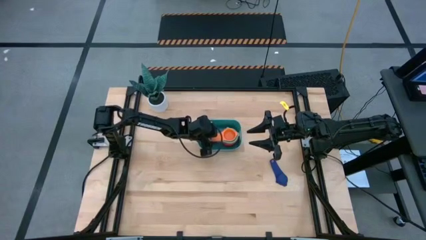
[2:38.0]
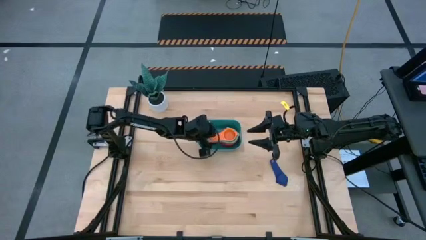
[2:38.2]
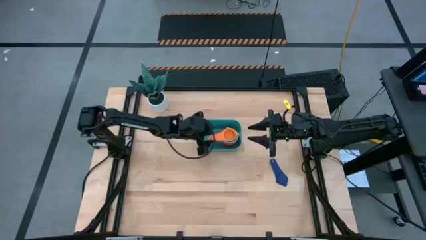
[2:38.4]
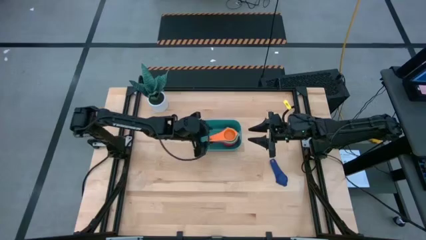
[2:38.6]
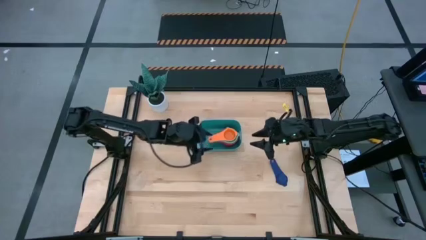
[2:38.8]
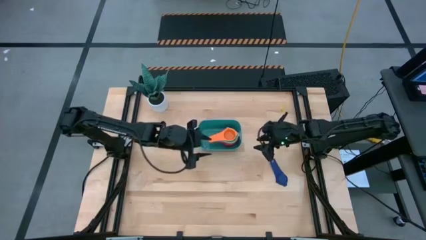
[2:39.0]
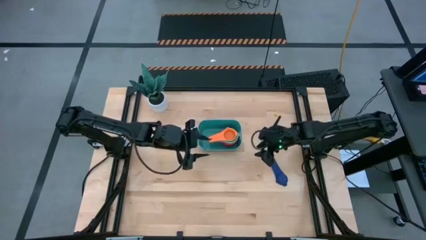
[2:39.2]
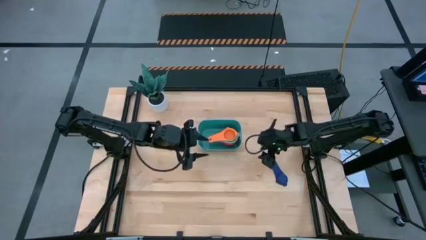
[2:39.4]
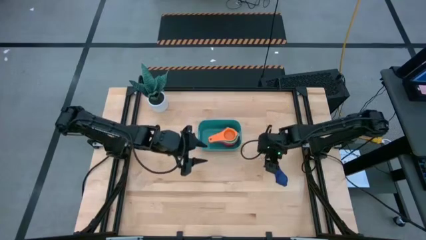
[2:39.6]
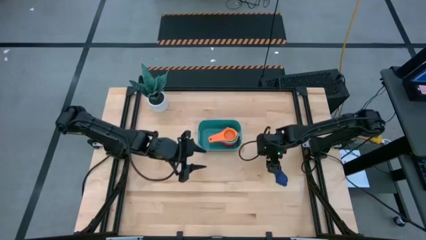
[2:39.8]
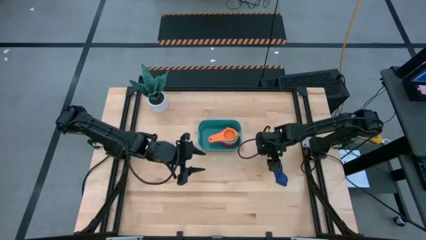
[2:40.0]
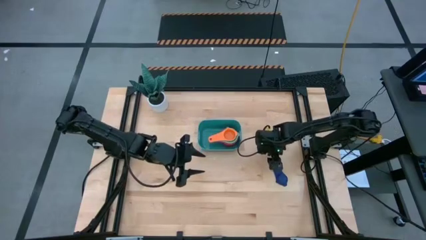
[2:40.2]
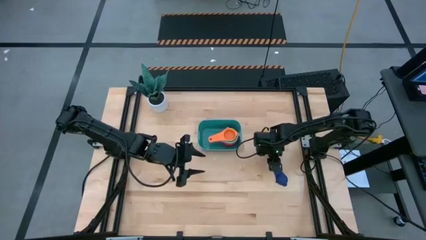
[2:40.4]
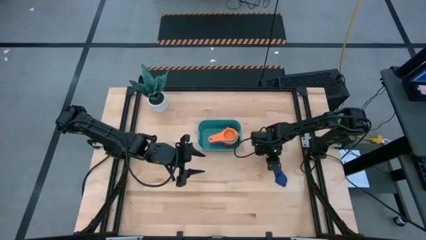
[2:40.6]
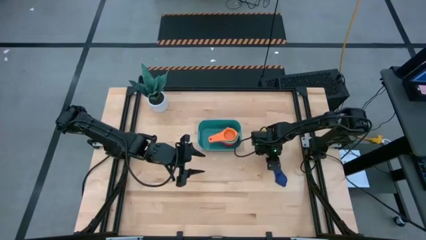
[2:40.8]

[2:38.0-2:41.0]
Task: Nest measuring cups in basket
Stack the dark blue measuring cup on top of the orange measuring cup inside the light blue bin

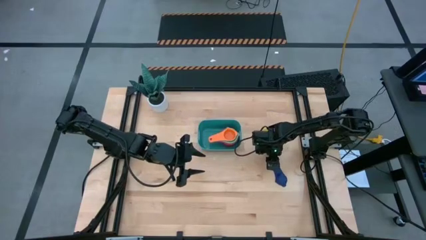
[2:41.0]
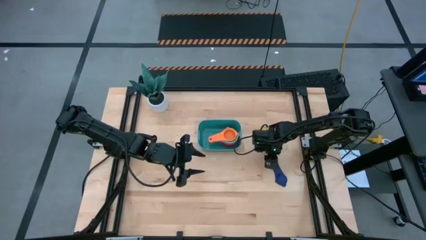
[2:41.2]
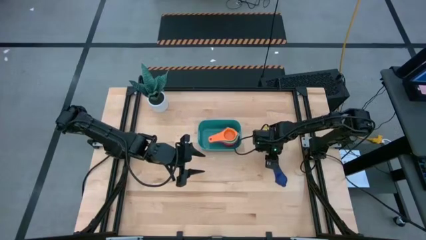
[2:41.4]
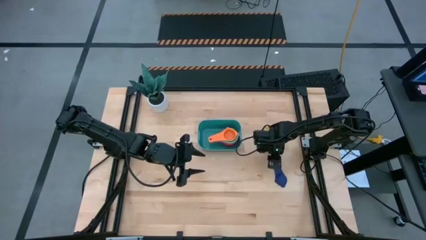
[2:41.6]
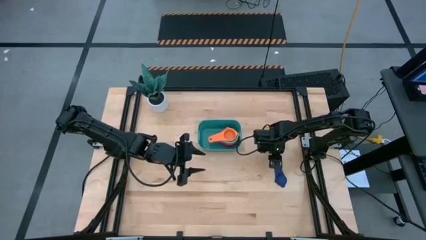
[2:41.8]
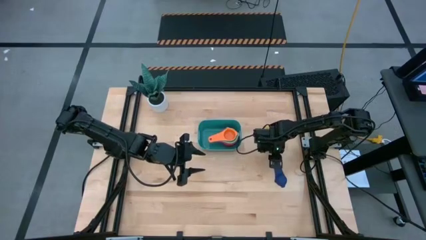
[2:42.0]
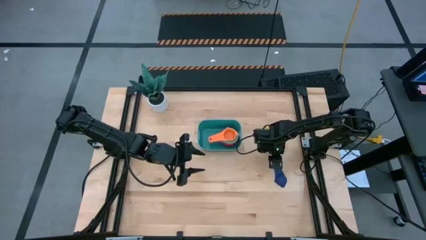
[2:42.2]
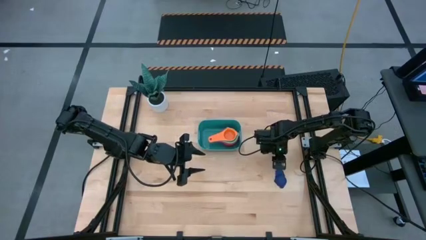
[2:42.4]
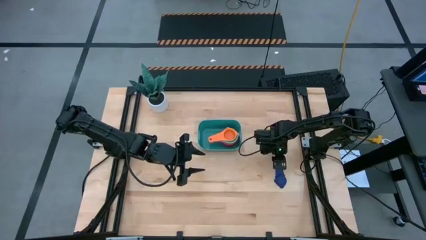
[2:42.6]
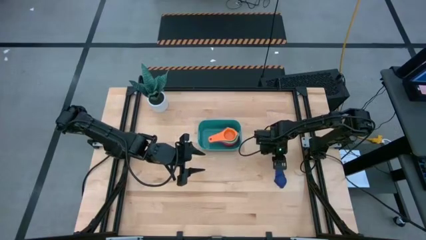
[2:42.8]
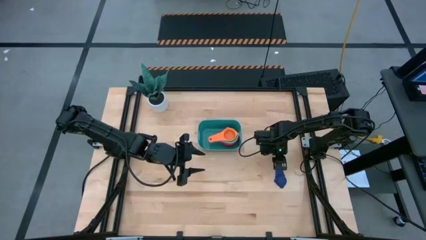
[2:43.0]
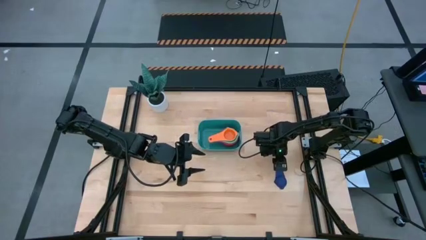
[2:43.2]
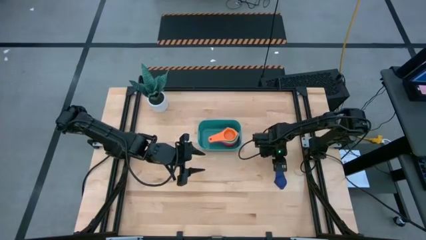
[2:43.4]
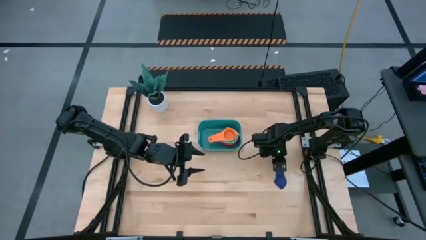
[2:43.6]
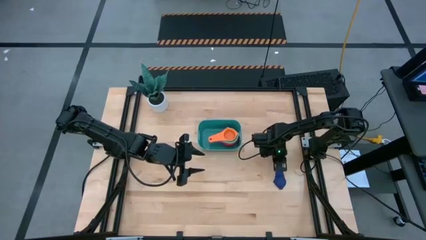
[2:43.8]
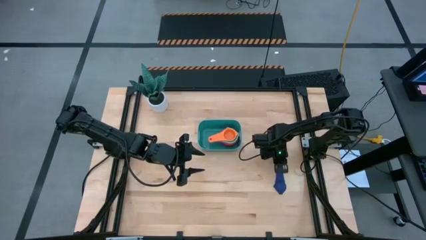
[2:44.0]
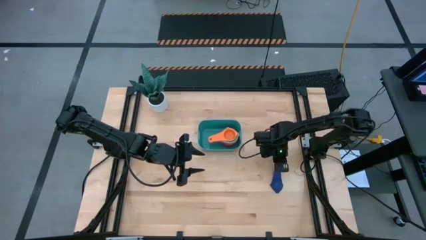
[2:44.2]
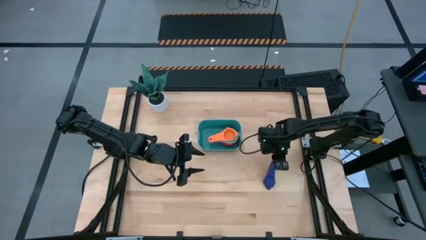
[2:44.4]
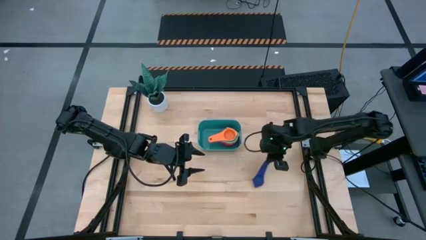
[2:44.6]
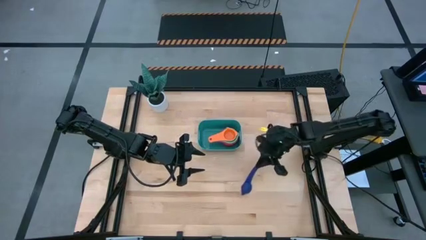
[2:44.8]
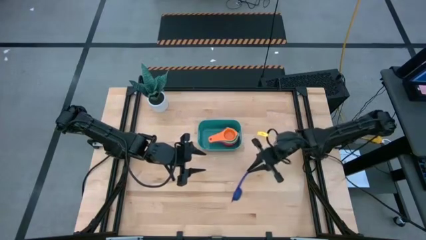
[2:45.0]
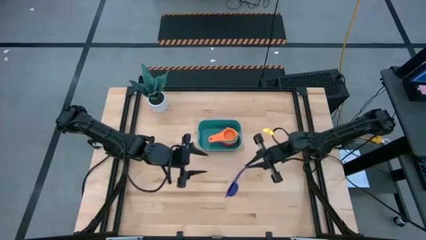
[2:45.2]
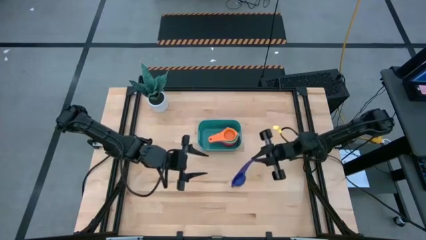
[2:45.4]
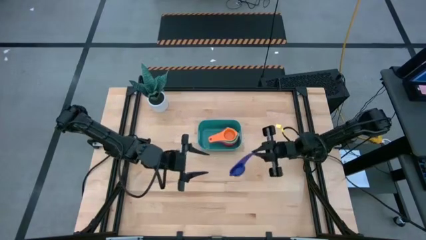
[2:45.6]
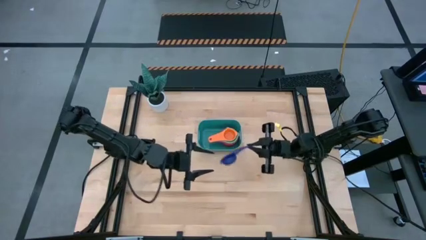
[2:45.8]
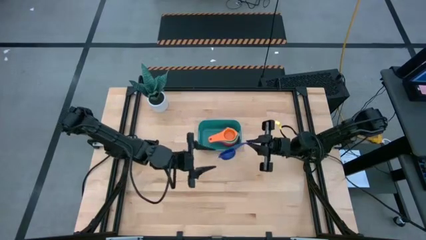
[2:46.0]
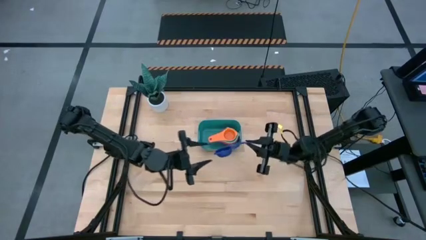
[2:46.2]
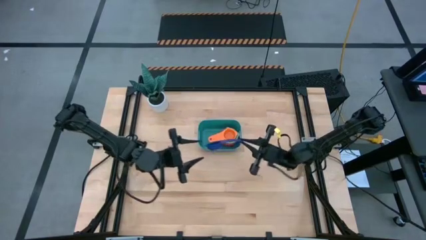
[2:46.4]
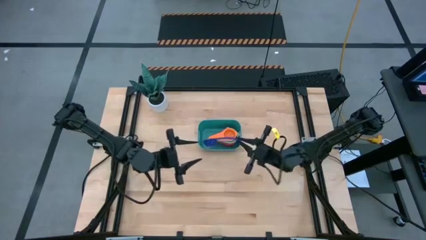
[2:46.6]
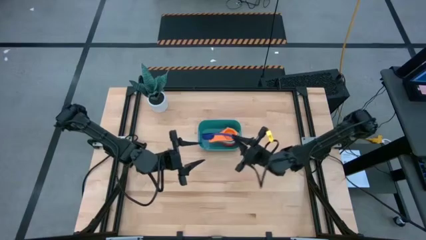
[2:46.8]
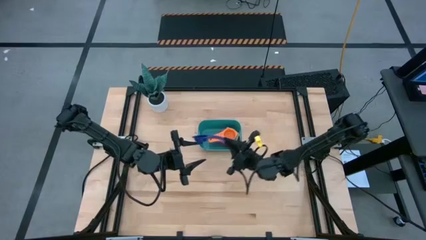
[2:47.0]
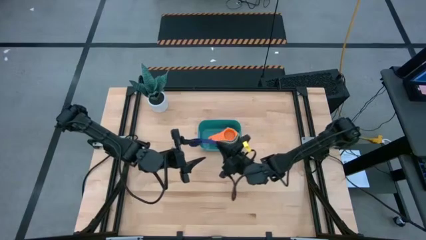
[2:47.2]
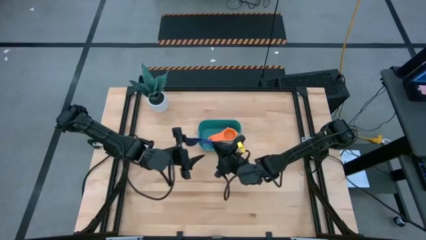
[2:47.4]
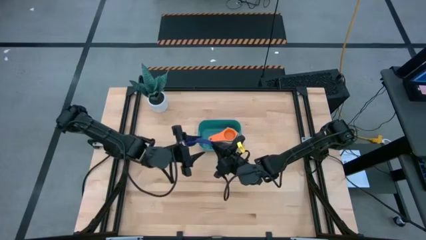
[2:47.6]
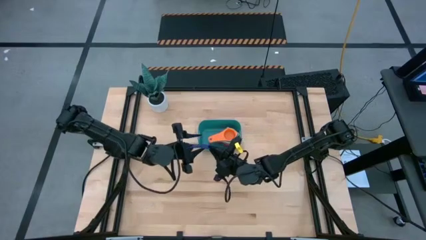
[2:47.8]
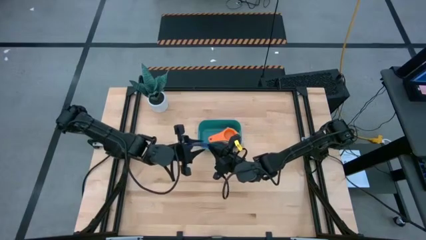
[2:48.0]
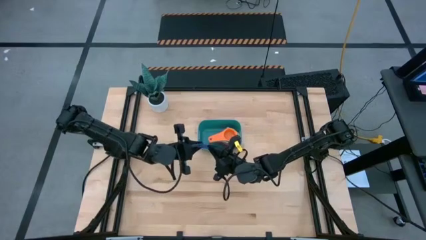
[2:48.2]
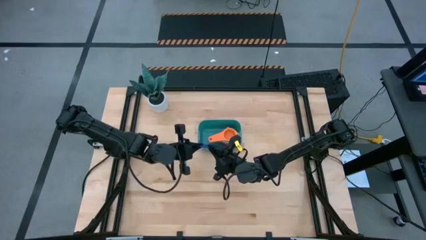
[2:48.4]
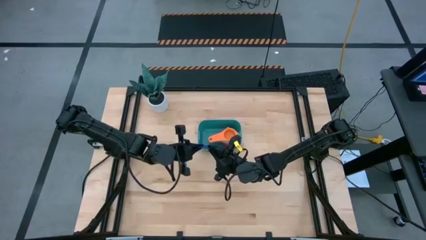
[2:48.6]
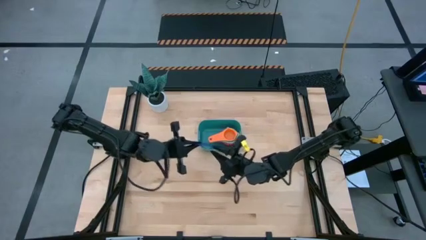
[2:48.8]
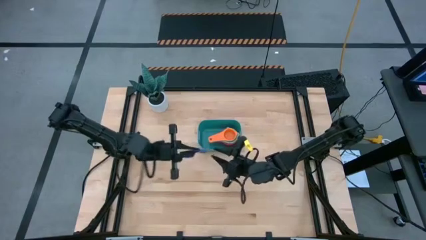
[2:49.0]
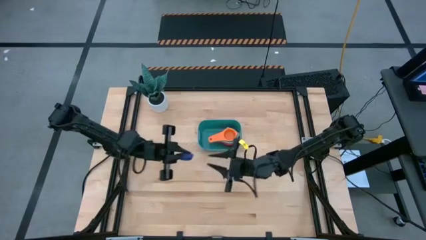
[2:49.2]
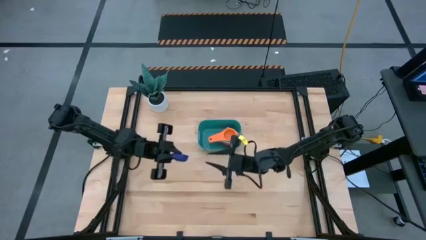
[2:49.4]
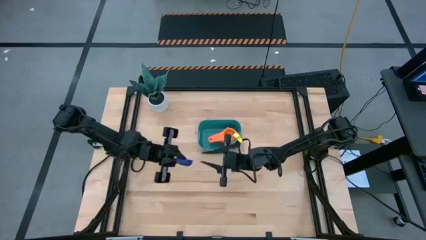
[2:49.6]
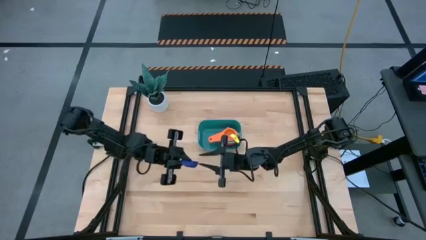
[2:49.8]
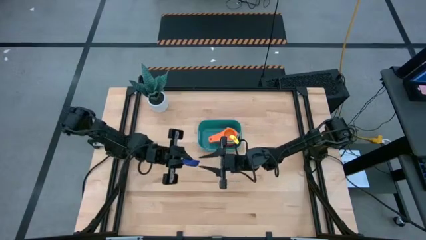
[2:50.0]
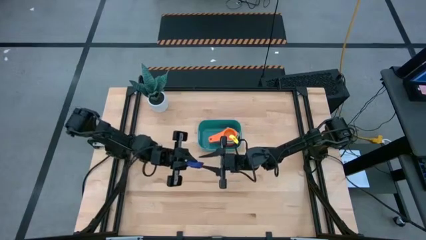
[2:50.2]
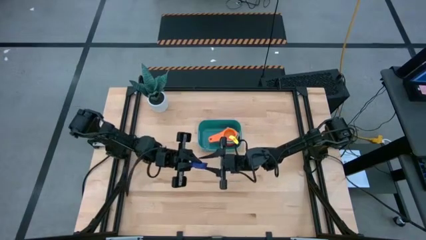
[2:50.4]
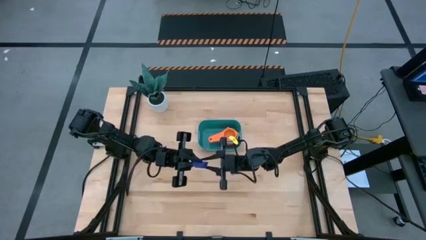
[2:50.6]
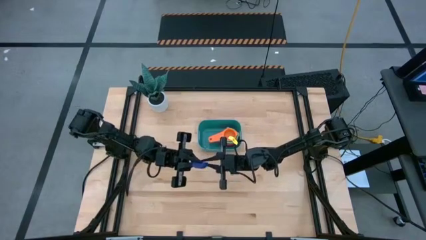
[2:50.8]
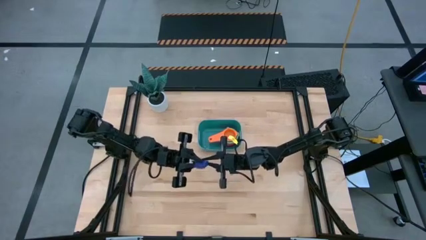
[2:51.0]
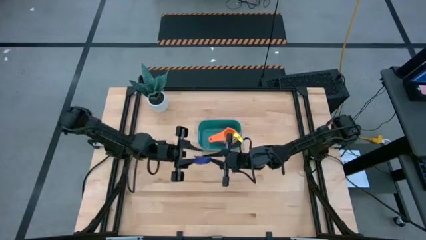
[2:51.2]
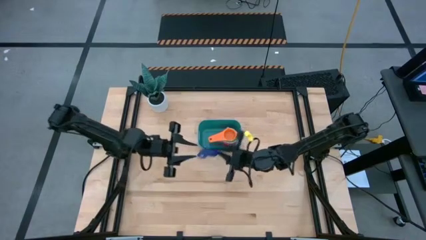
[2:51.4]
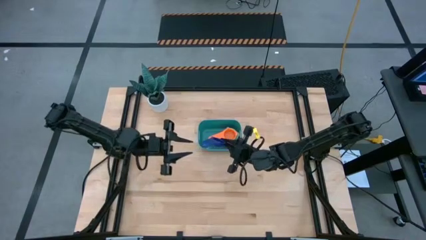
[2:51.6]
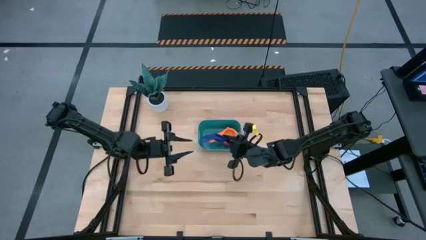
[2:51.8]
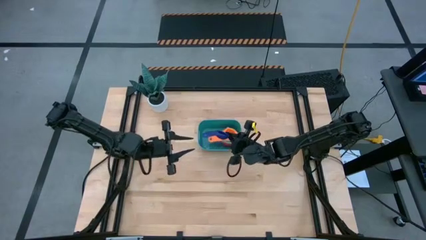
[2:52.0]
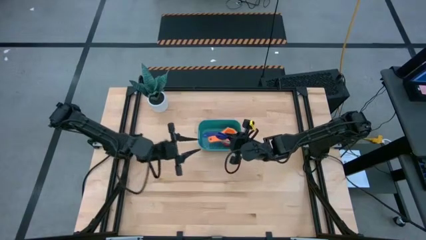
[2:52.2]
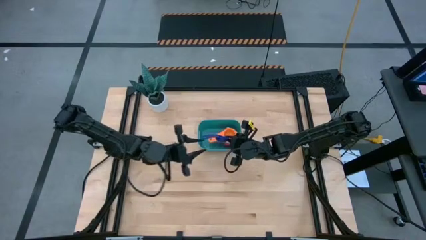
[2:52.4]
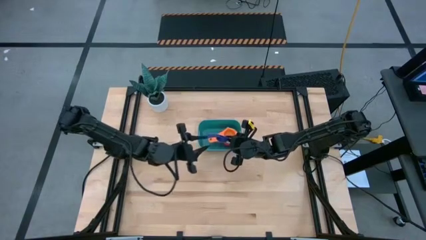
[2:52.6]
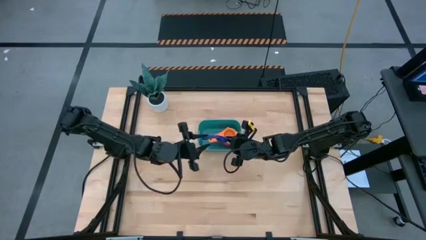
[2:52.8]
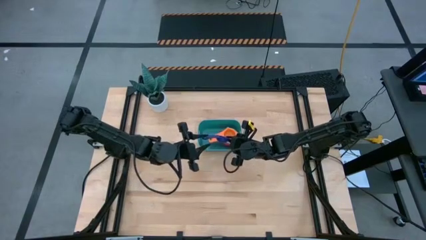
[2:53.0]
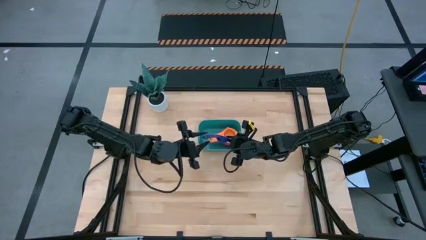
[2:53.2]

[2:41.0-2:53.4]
Stack the dark blue measuring cup on top of the orange measuring cup inside the light blue bin
